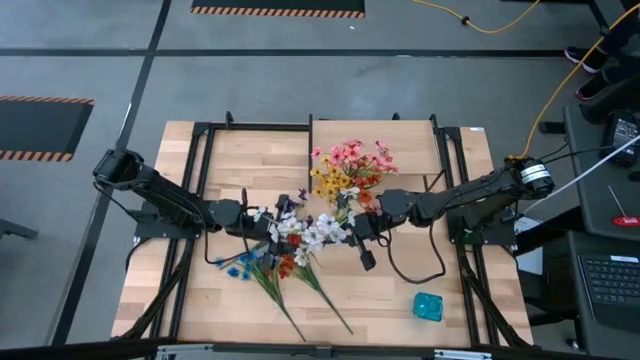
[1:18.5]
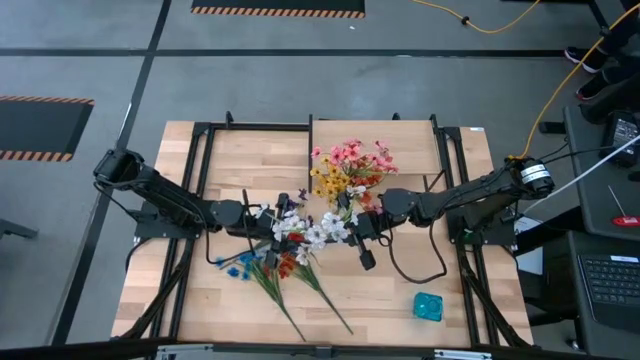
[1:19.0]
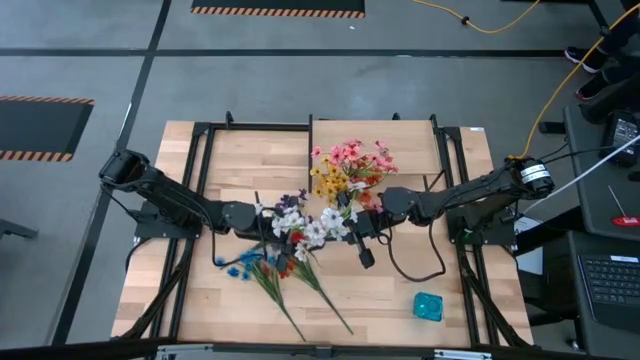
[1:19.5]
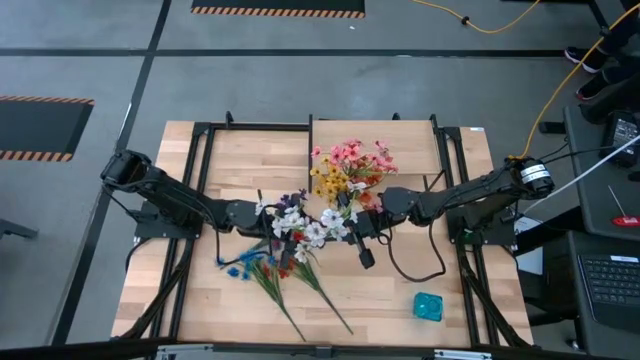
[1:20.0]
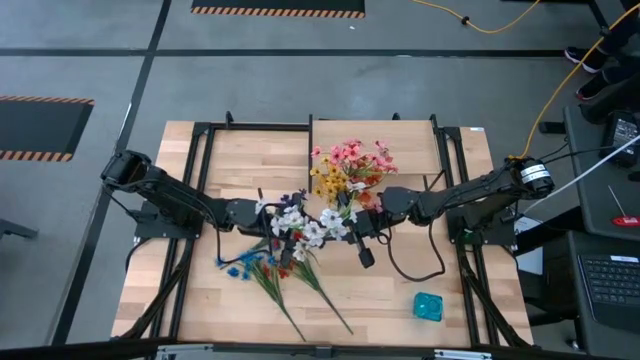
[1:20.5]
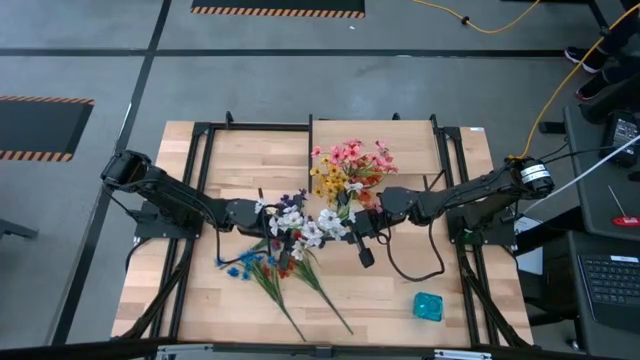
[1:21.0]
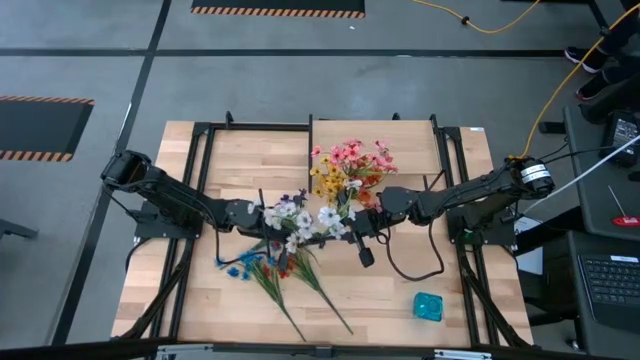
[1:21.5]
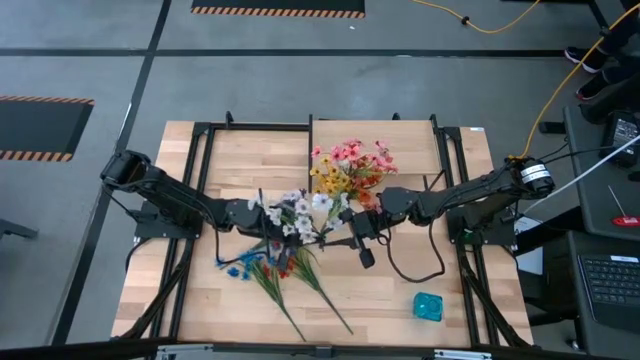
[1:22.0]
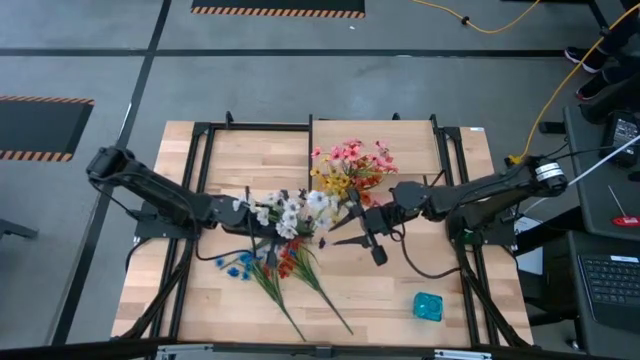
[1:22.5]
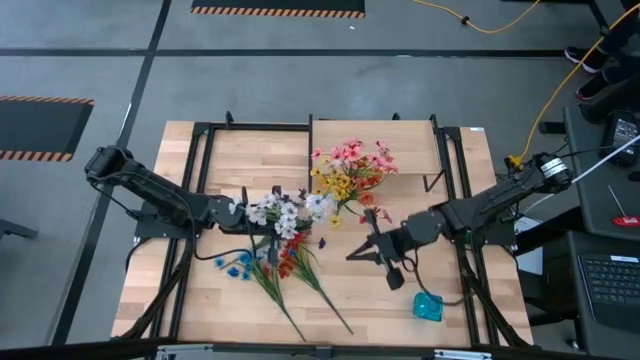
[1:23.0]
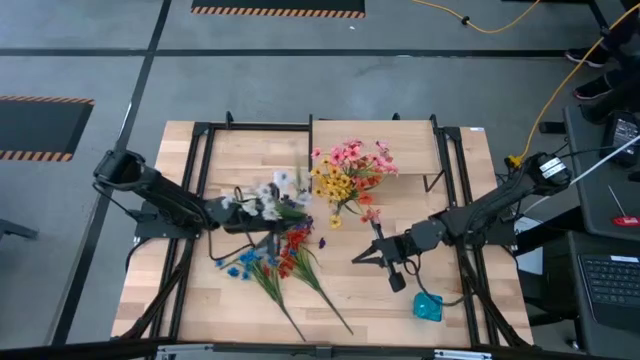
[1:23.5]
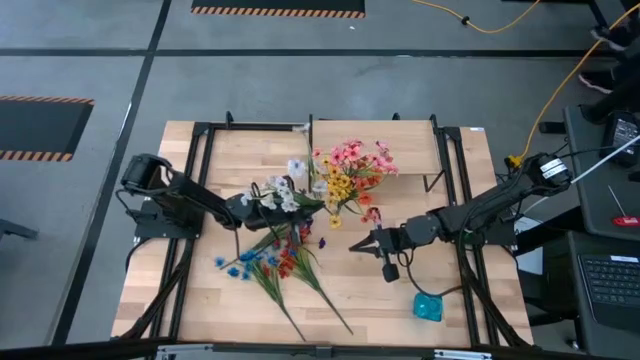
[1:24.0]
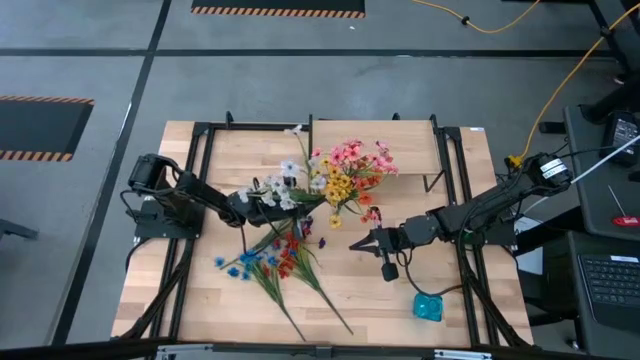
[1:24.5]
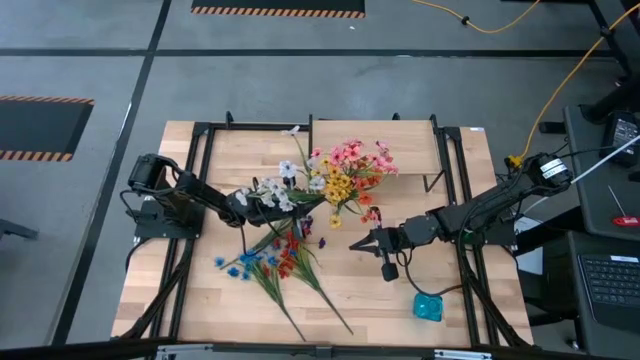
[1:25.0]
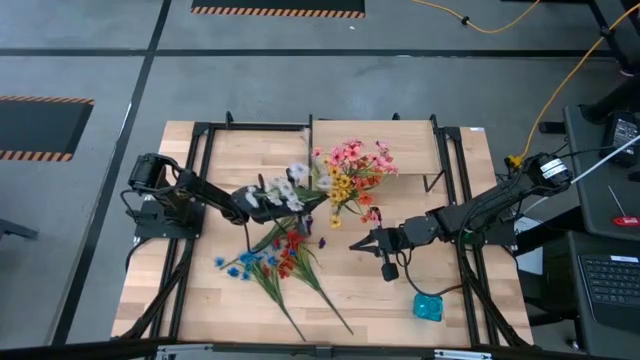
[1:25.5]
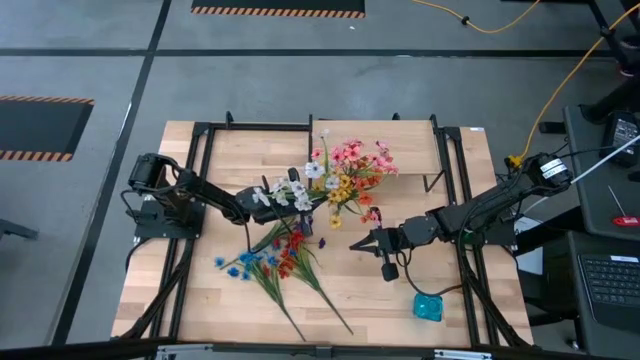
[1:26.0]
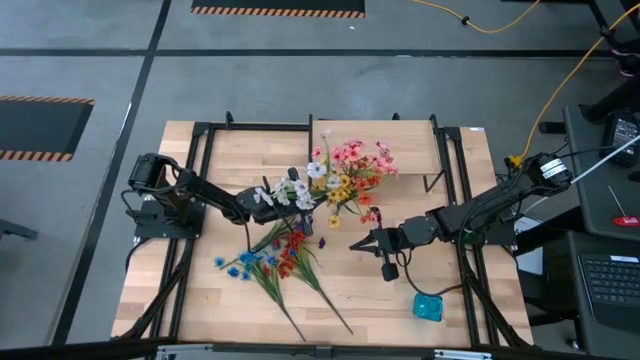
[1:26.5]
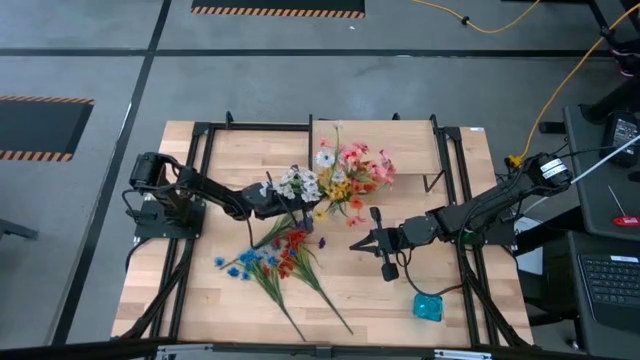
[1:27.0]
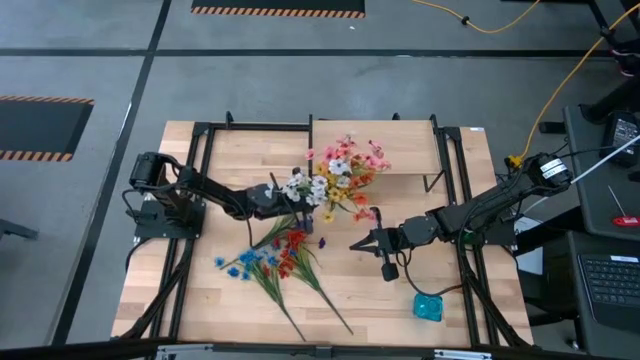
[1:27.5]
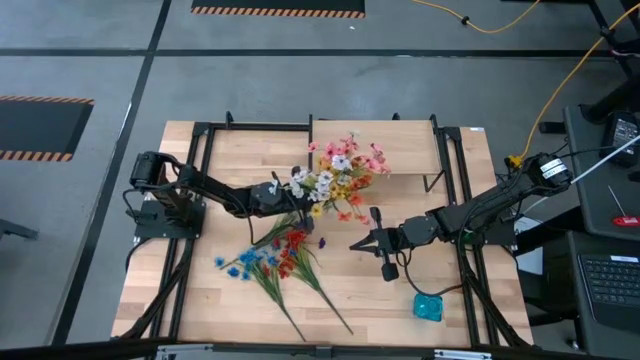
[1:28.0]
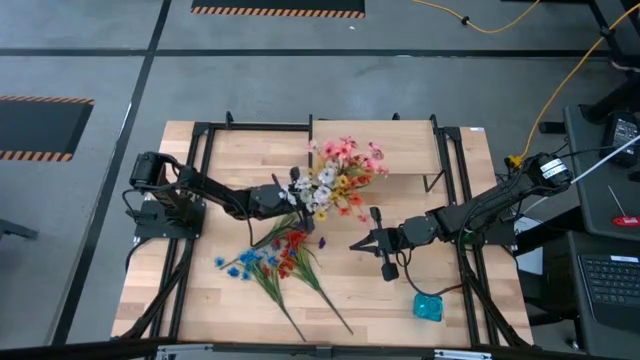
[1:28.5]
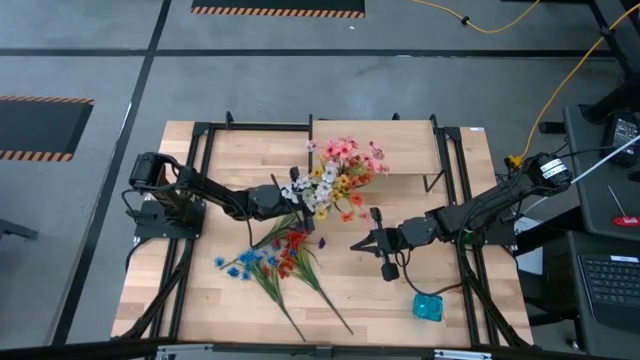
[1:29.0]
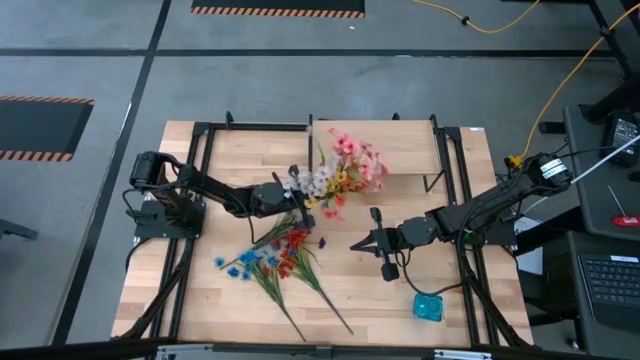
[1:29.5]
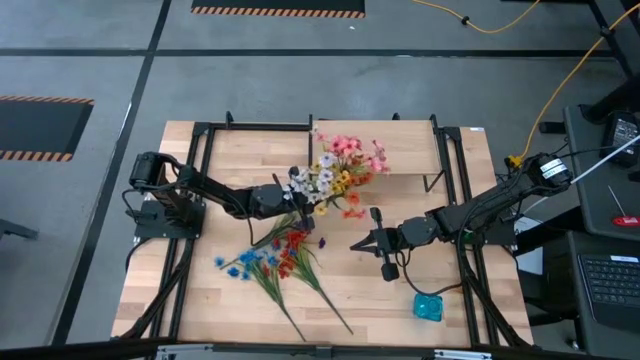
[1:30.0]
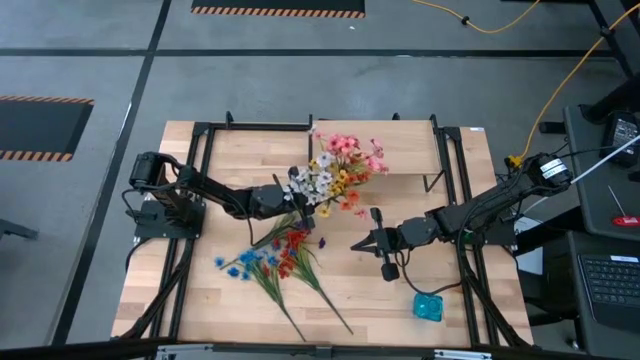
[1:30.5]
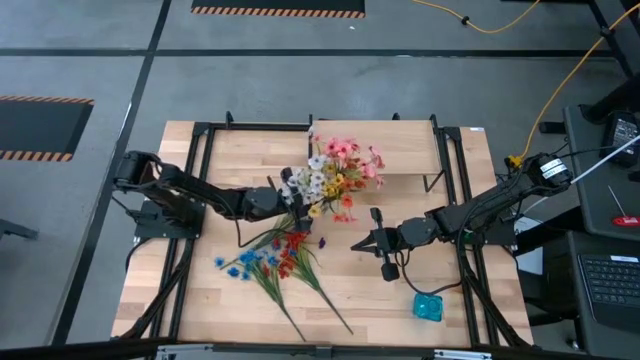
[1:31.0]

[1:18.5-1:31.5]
Task: Pick and place flowers into a vace then onto a shelf
Put the white flowers into the transparent vase

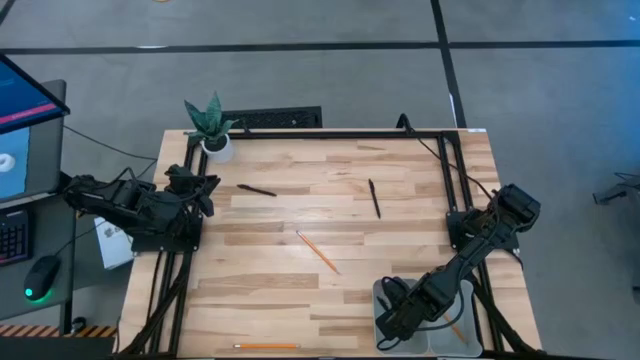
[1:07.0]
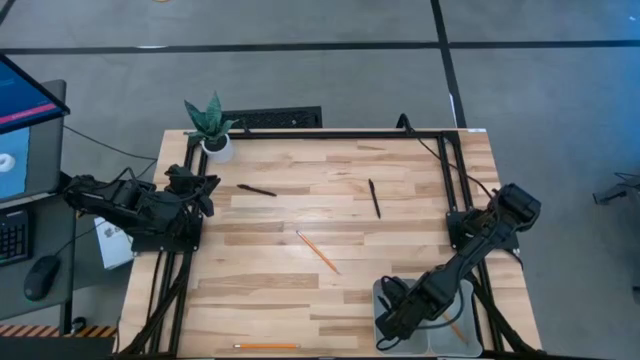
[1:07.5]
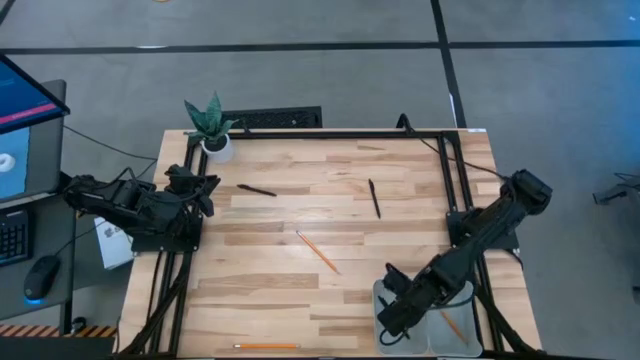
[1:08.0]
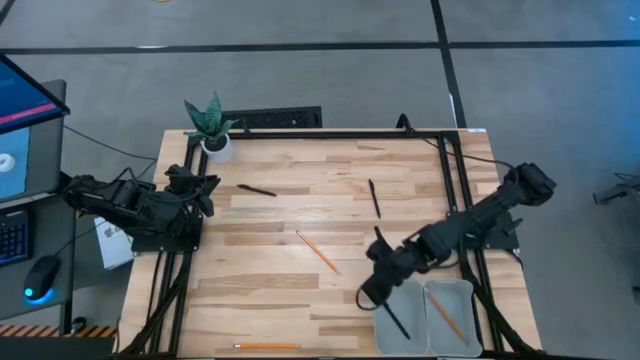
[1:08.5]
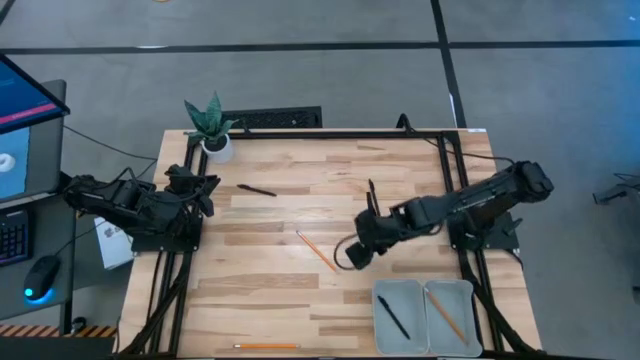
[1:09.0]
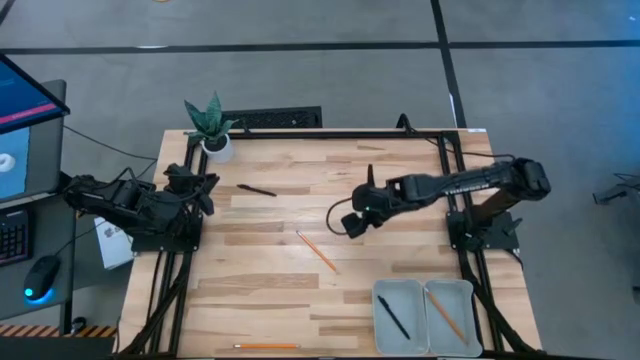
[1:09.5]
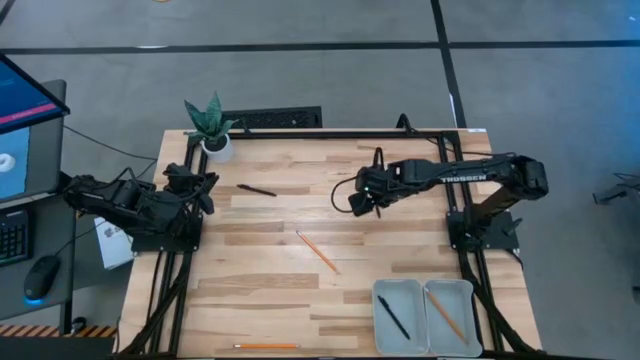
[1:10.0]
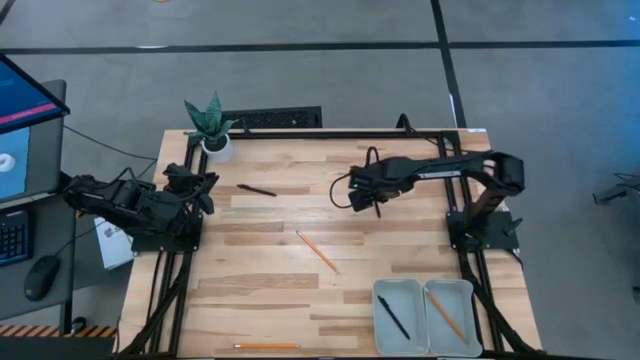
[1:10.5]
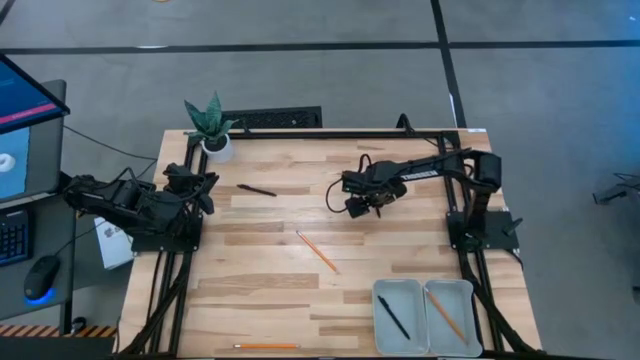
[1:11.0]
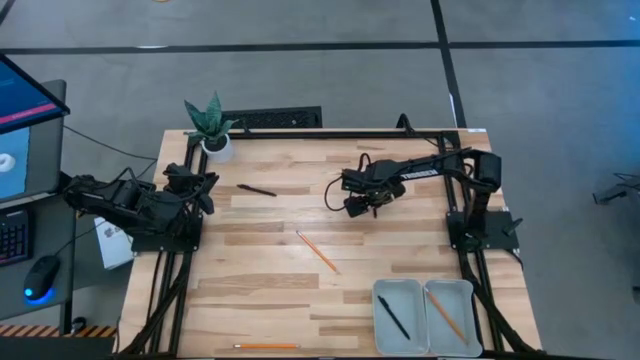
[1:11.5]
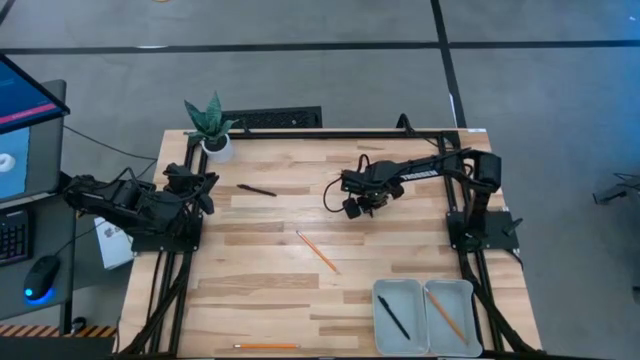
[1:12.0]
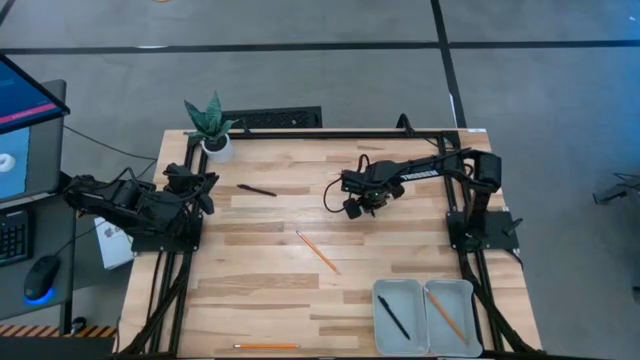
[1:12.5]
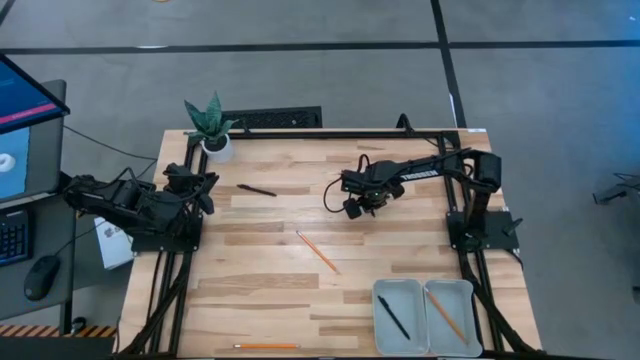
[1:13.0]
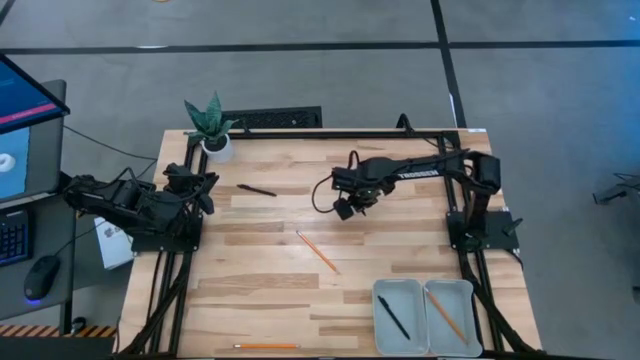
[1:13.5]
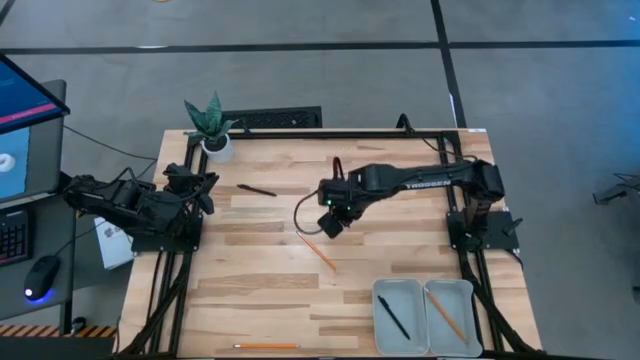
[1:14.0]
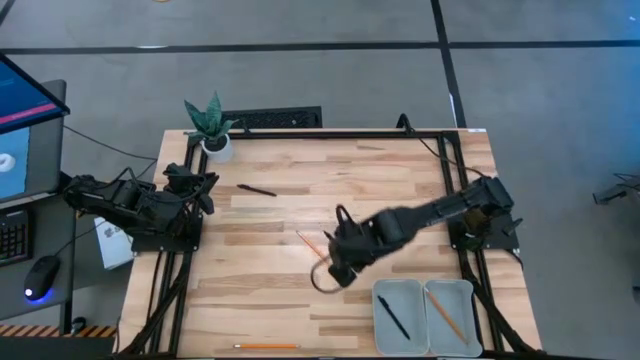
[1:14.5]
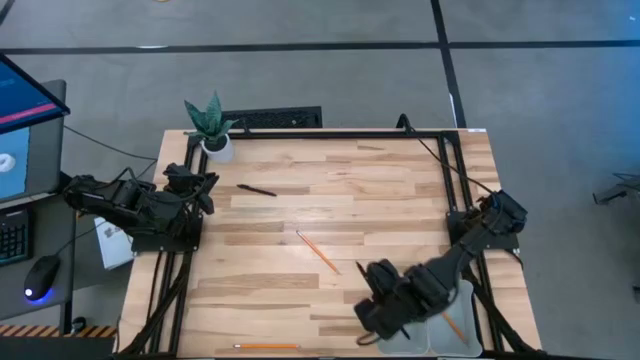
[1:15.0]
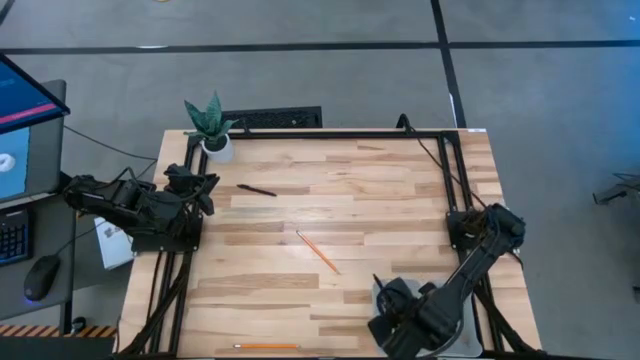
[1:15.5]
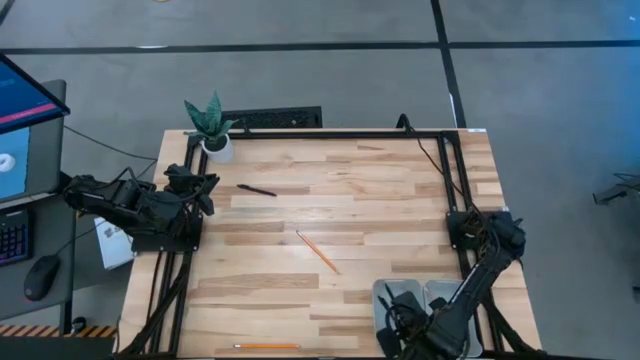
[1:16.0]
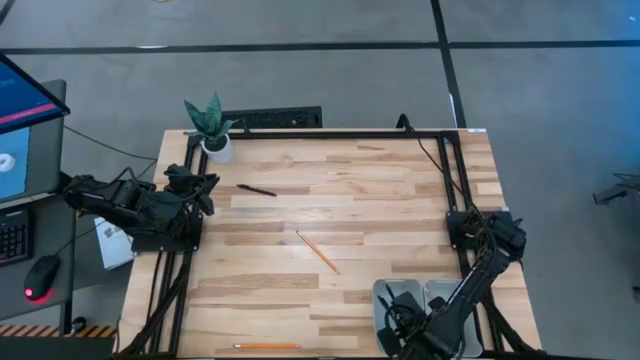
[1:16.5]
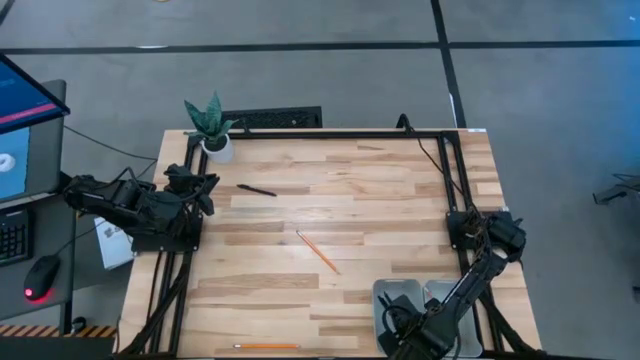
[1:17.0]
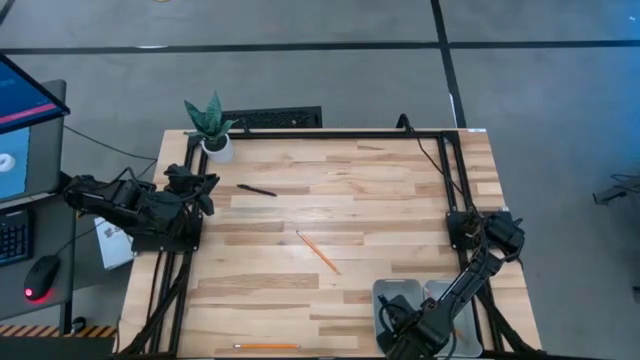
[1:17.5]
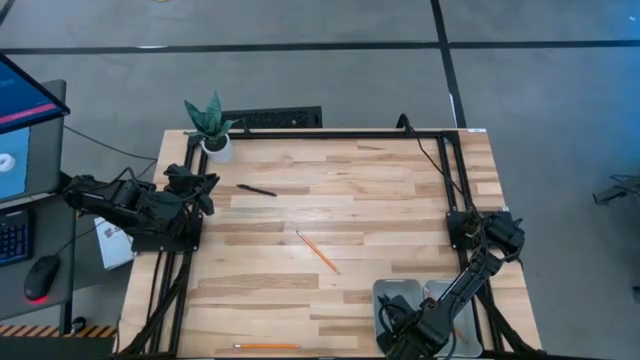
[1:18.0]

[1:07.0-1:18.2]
Task: Sort pens & pencils
Put the top right black pen into the bottom left gray bin
